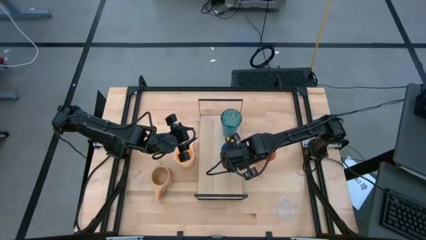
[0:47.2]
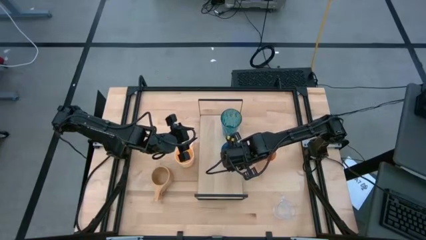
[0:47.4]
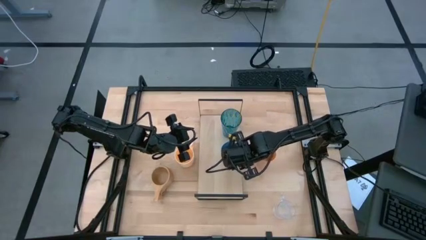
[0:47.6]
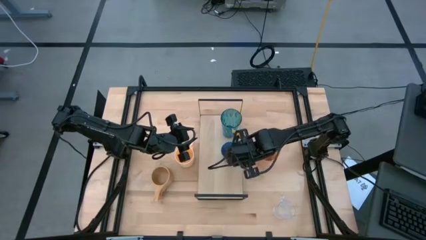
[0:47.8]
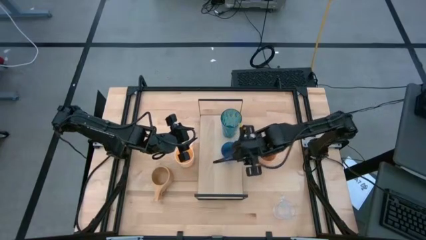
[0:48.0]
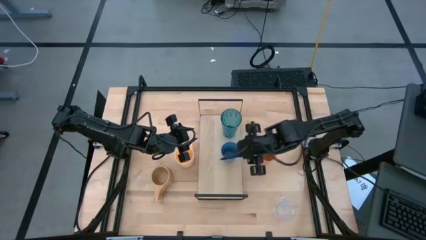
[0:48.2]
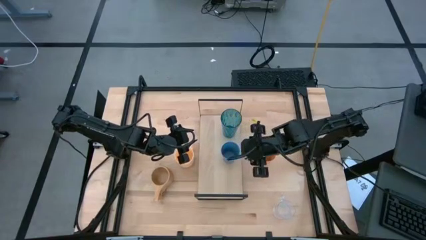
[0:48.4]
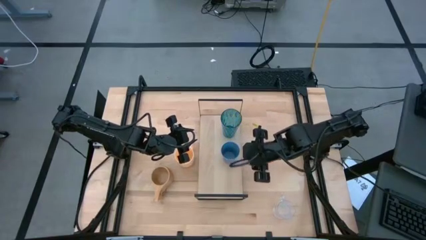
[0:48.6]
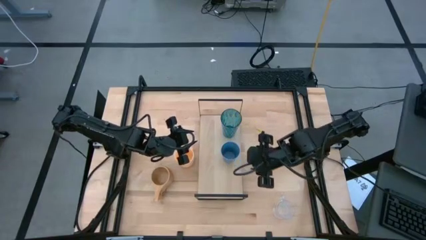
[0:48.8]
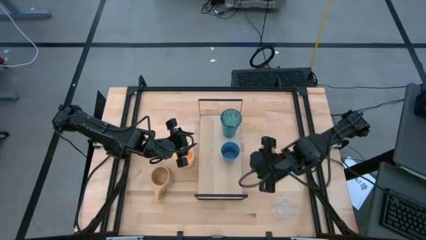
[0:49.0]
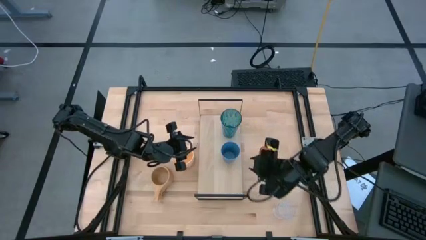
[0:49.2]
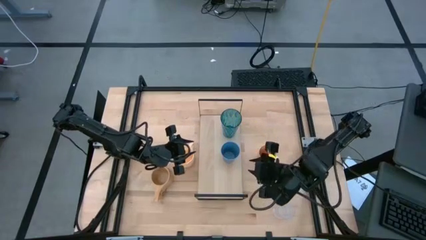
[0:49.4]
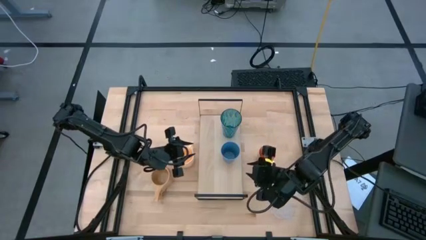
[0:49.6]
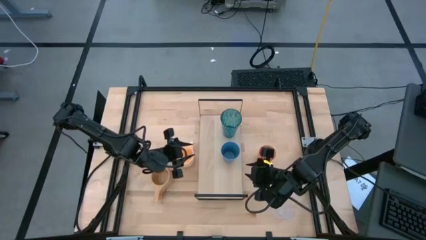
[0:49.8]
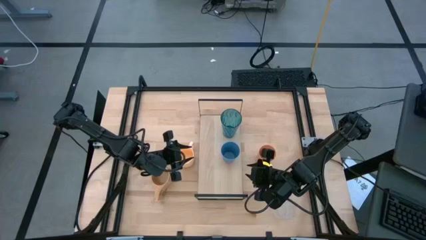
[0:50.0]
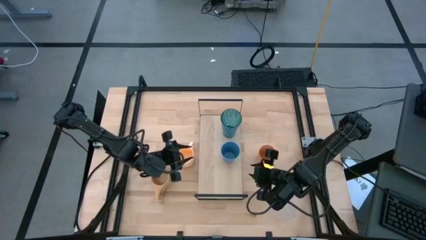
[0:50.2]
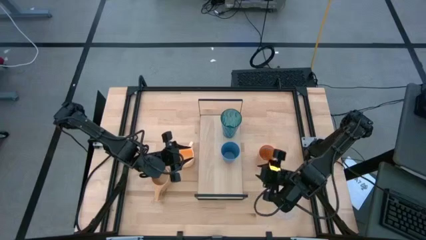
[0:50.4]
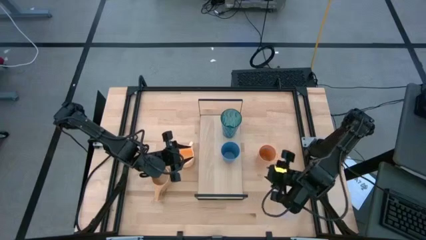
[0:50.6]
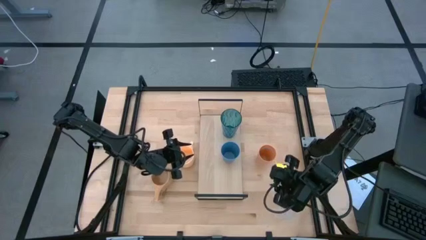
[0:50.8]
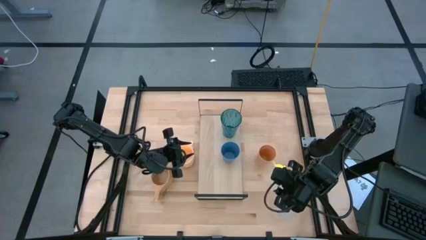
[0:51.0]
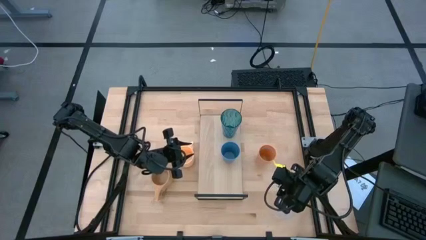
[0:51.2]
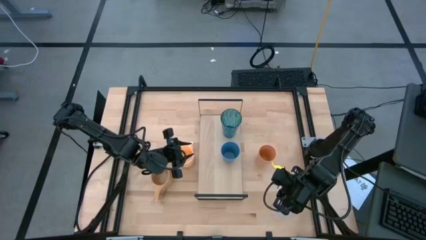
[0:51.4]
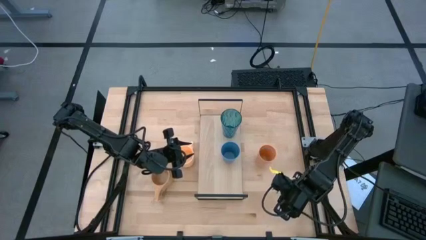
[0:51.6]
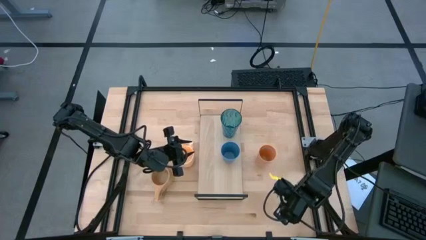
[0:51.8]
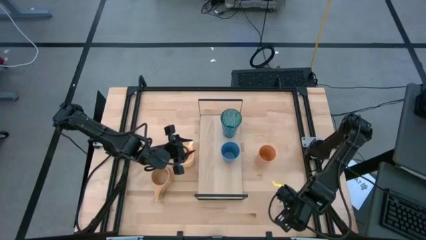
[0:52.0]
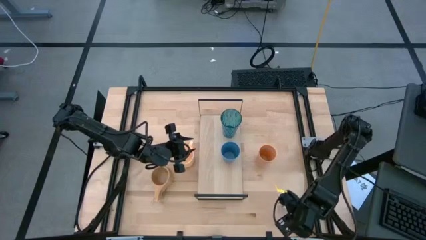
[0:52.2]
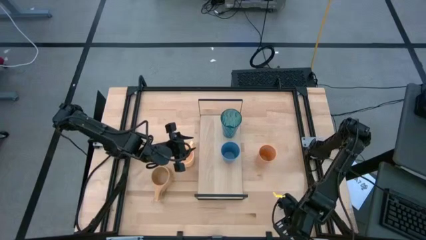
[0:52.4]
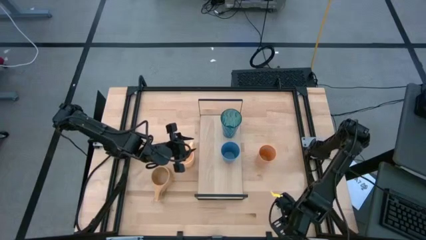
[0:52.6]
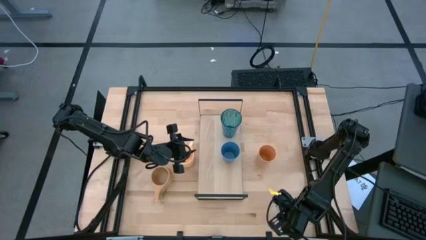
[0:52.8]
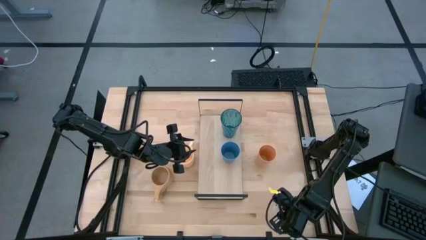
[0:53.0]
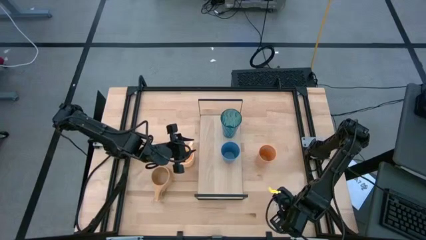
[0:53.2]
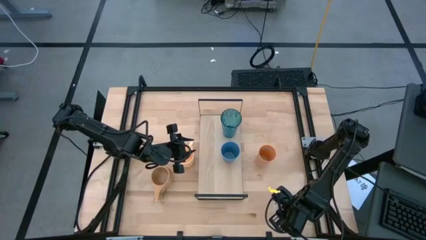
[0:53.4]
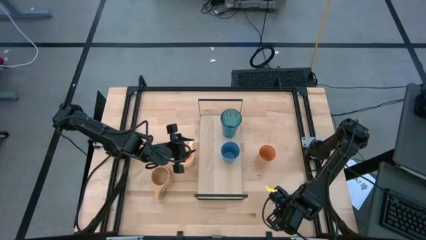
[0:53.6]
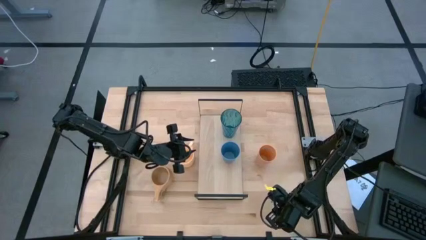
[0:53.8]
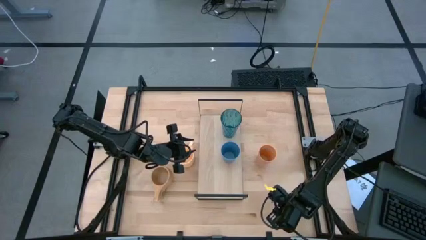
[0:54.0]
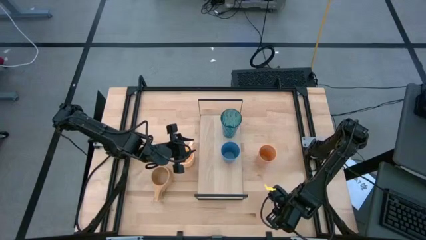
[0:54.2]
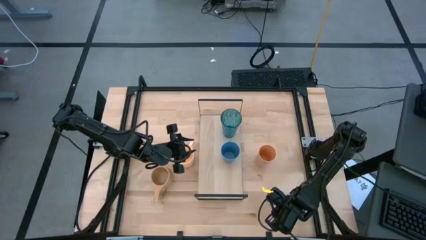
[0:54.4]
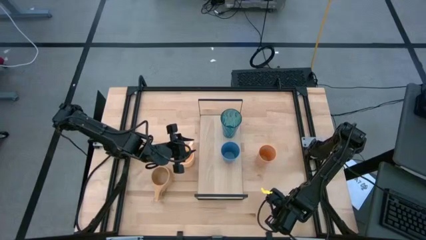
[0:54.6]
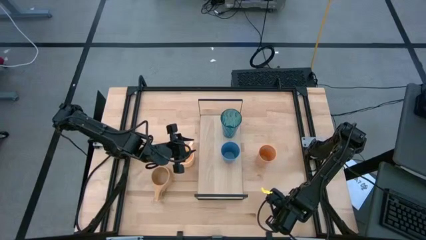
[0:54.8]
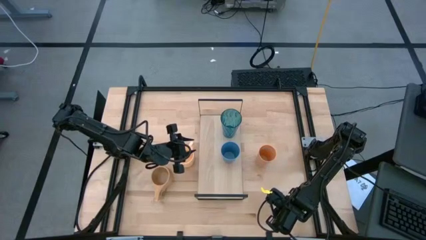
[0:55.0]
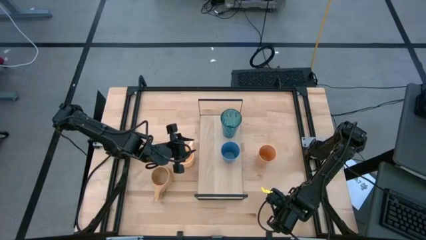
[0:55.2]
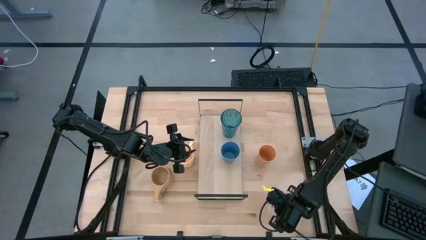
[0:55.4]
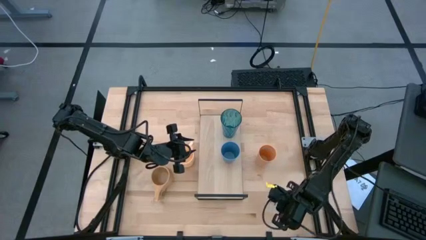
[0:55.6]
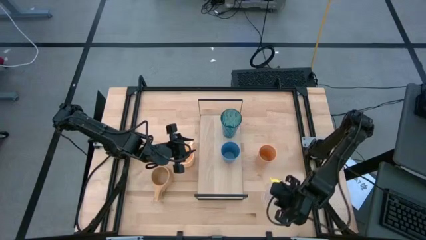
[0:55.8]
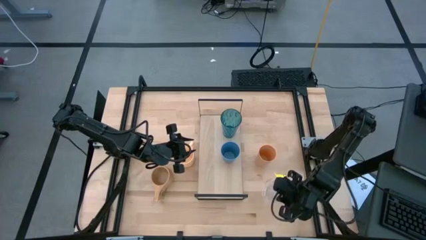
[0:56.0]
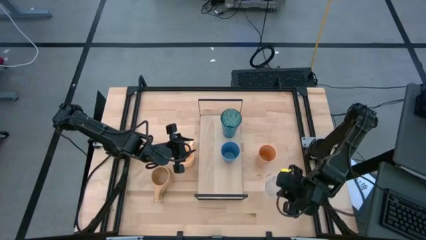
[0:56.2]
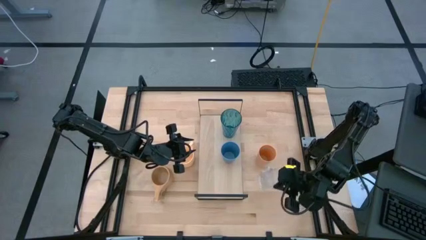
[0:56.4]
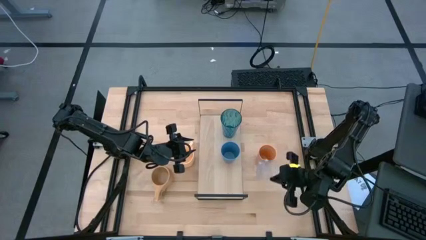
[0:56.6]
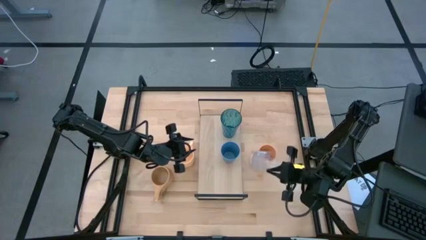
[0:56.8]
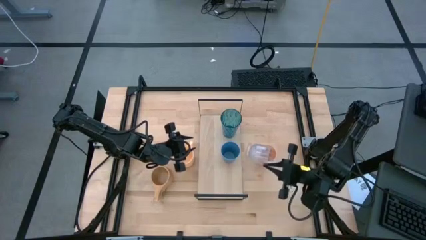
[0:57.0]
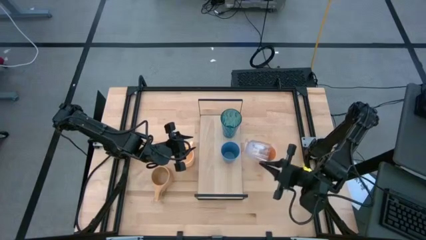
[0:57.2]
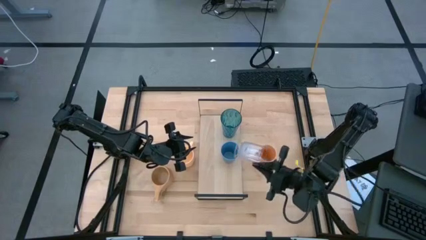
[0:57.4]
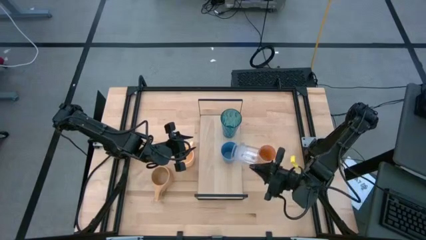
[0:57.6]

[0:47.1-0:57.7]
Task: Stack small to large cups/mugs on shelf
Put the transparent mug on the shelf

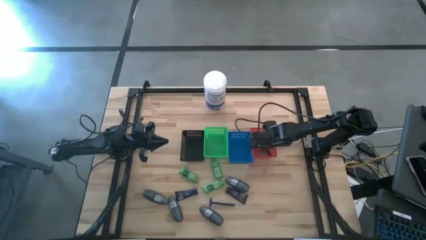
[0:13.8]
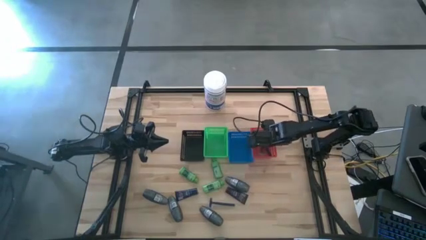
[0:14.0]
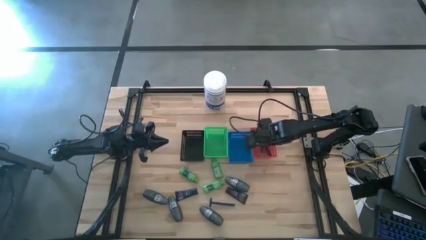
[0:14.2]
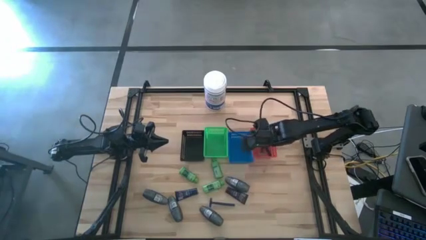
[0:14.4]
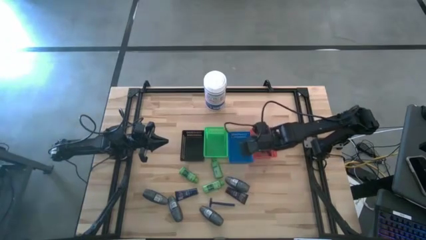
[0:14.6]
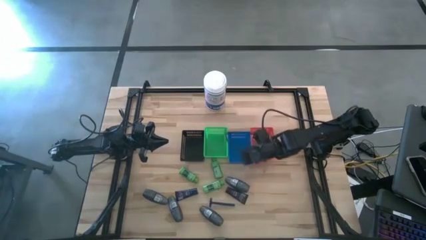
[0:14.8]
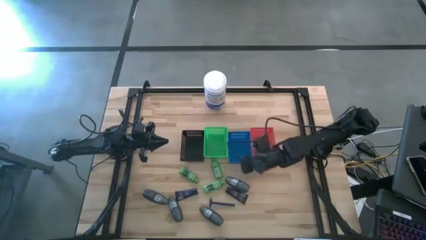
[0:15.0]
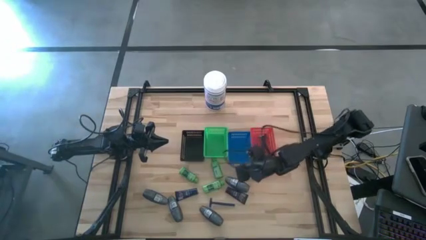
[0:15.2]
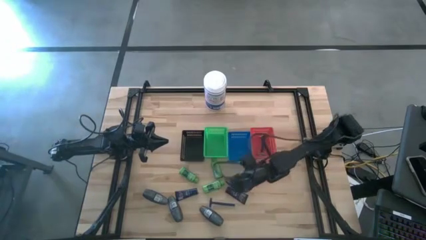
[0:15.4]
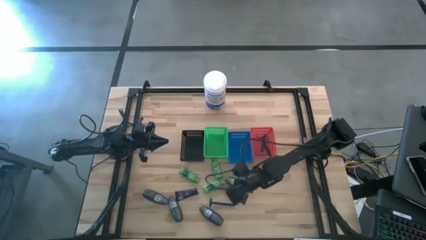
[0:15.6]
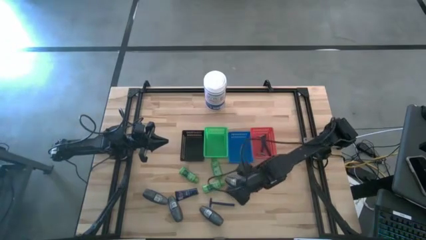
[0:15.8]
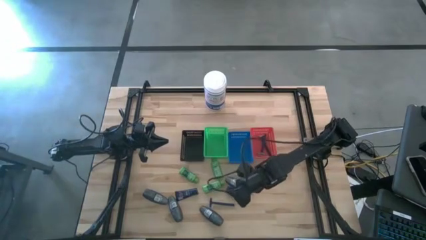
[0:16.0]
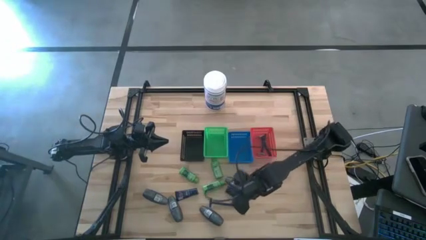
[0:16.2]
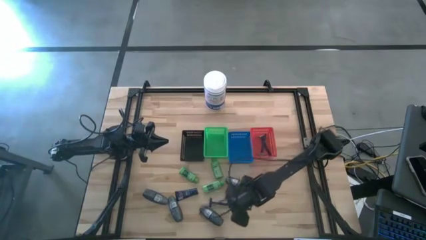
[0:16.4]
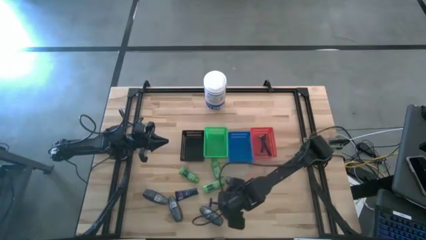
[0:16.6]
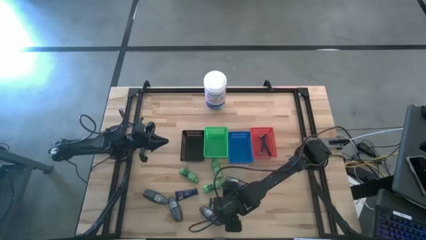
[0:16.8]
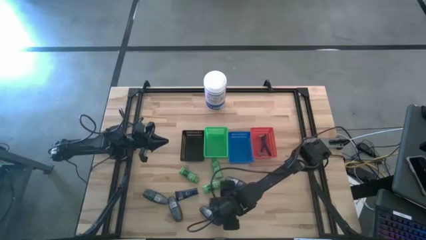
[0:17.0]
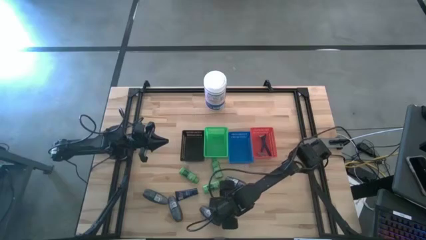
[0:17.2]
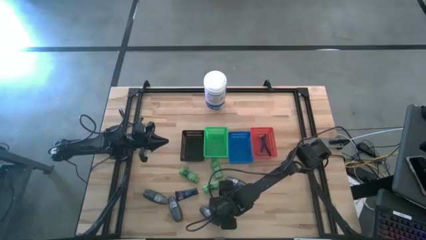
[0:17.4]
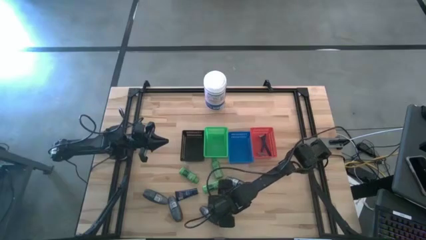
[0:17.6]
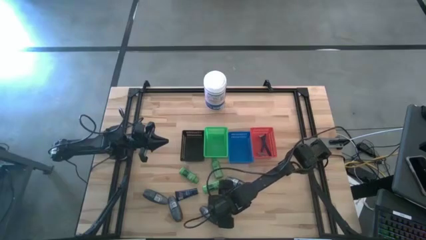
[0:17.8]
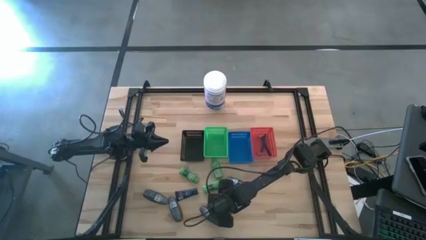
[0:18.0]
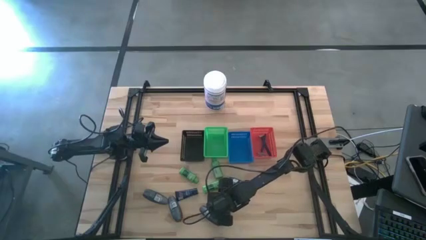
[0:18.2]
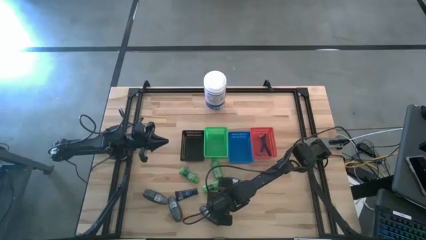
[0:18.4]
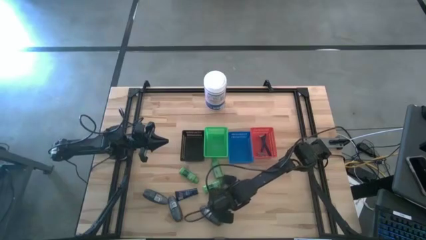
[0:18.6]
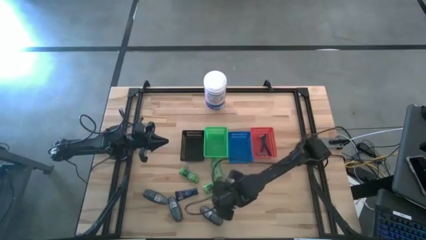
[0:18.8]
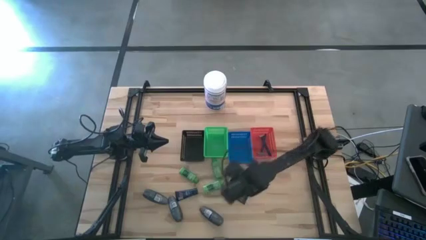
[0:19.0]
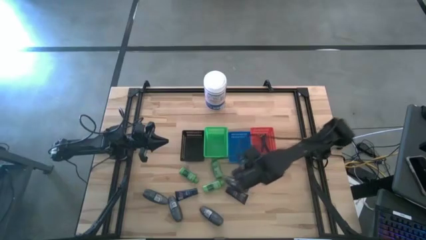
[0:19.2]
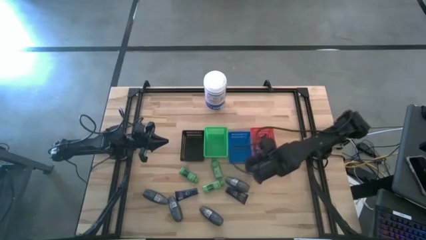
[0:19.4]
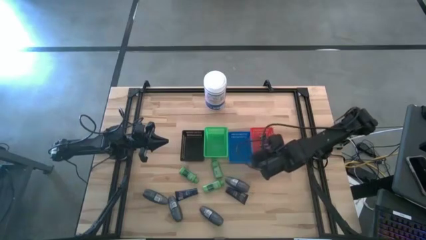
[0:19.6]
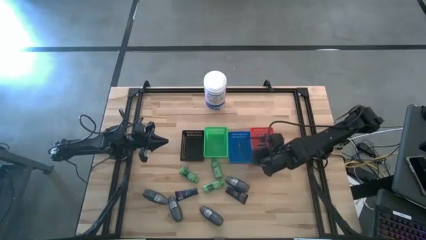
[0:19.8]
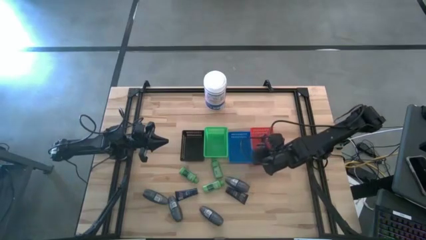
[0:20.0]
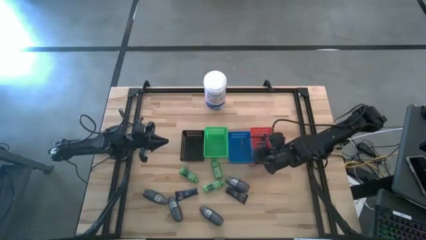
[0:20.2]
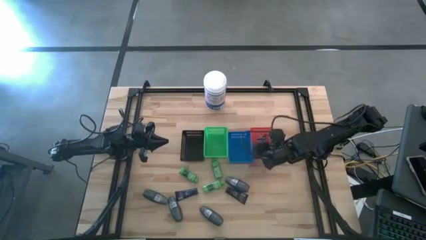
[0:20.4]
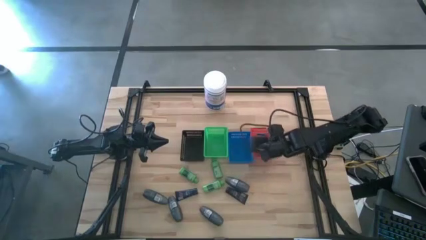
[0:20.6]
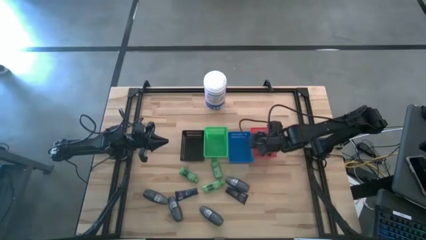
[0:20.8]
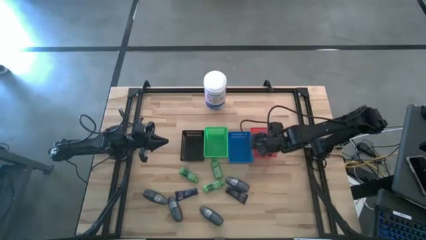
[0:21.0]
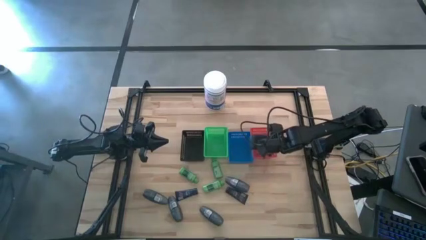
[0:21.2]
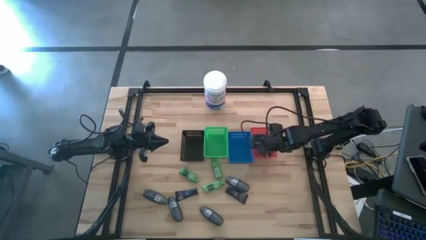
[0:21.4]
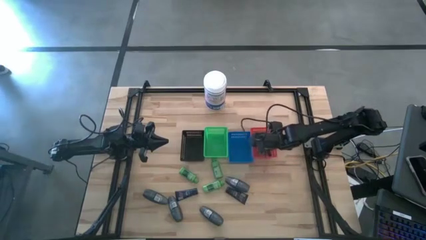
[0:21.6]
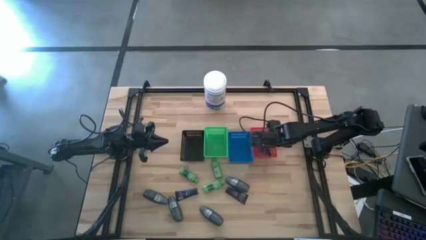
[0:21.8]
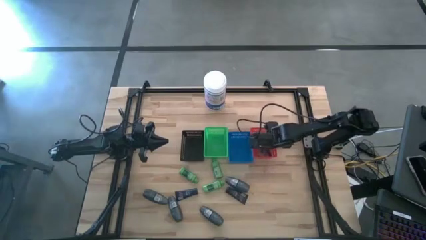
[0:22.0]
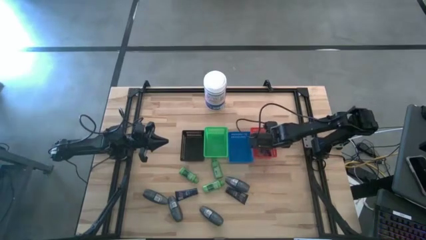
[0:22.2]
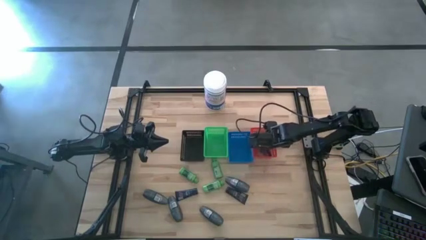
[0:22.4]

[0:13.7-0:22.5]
Task: Pick & Place Travel size toiletries
Put the blue razor into the red basket
